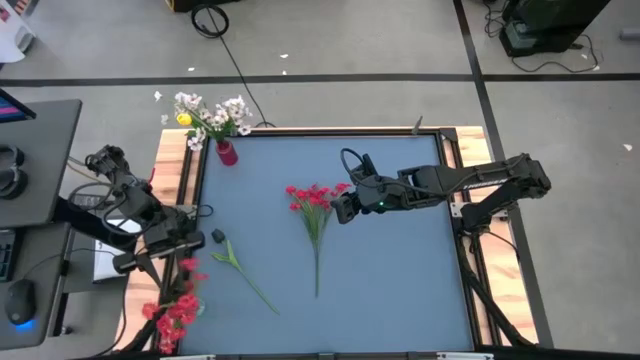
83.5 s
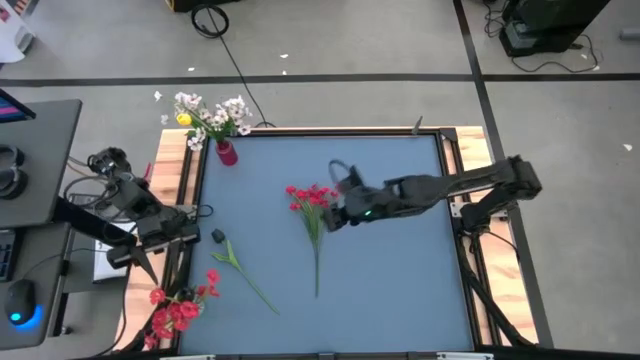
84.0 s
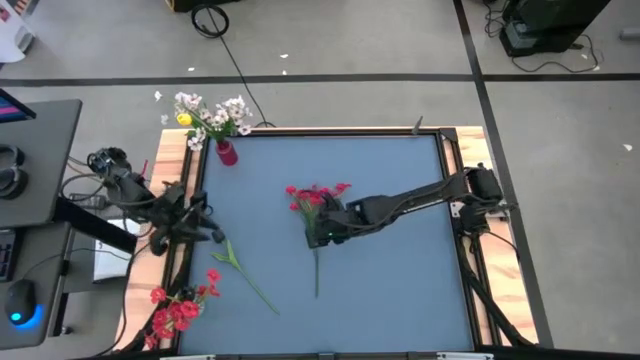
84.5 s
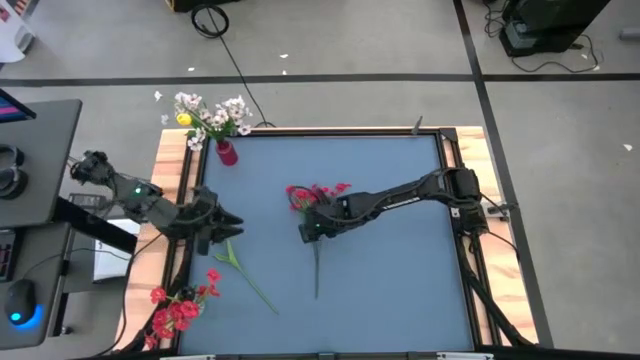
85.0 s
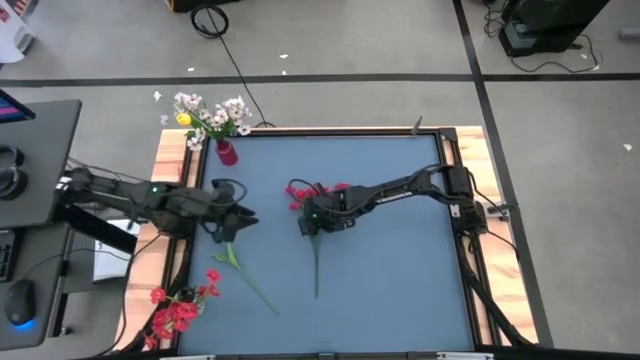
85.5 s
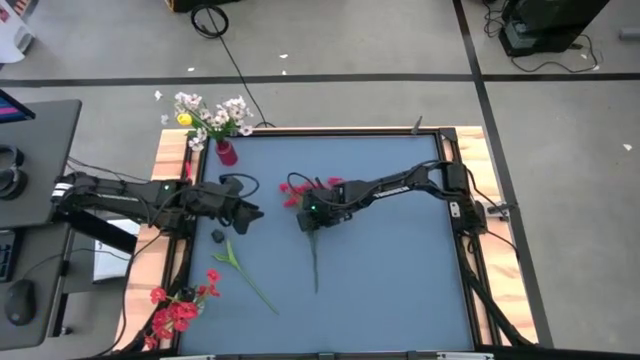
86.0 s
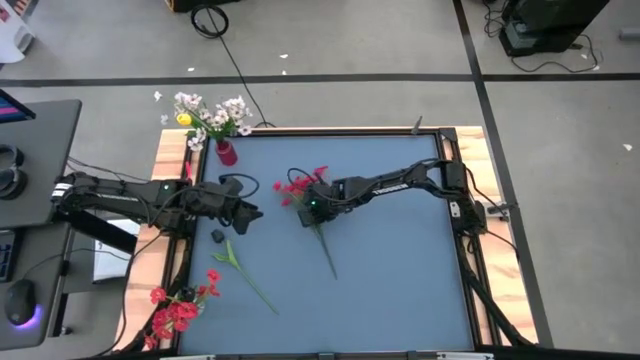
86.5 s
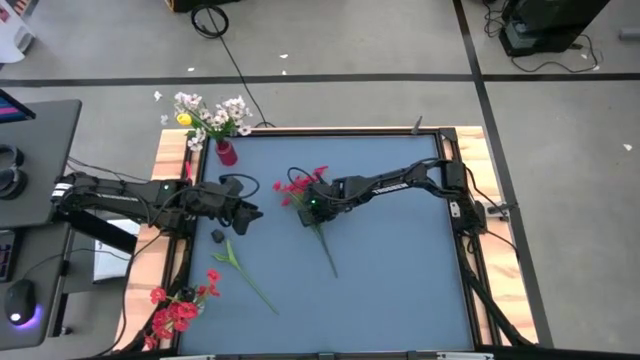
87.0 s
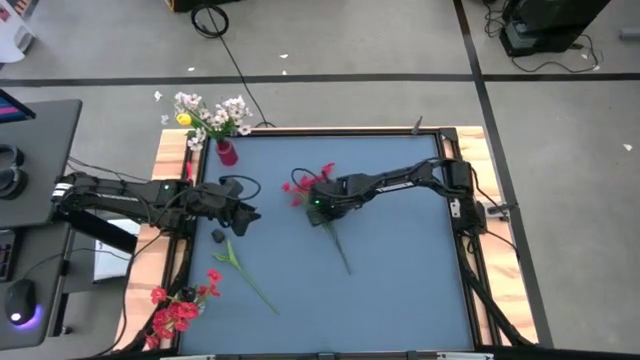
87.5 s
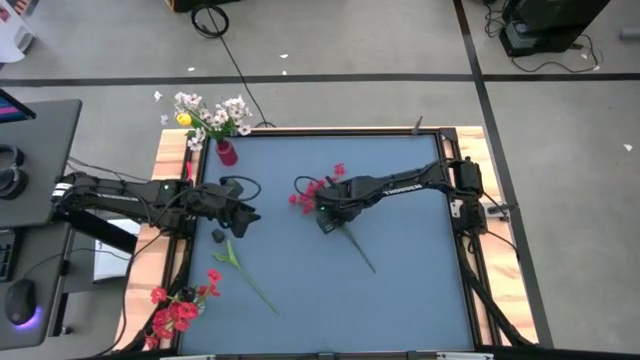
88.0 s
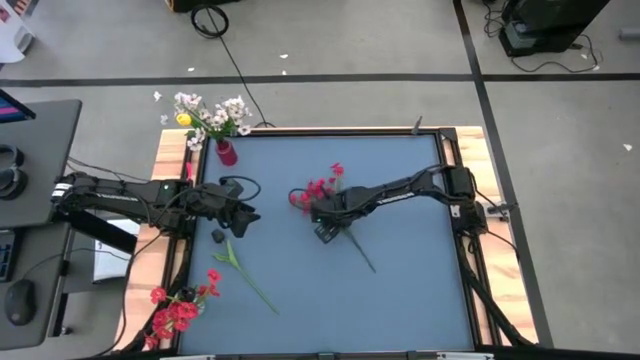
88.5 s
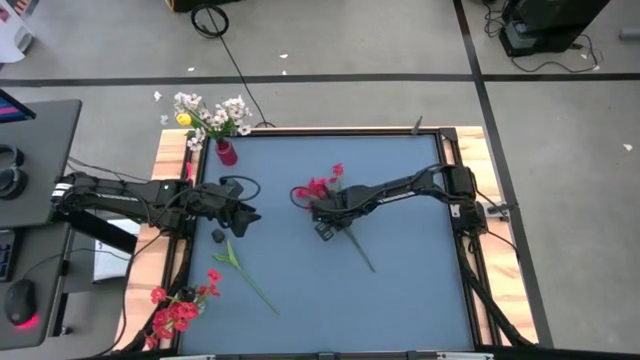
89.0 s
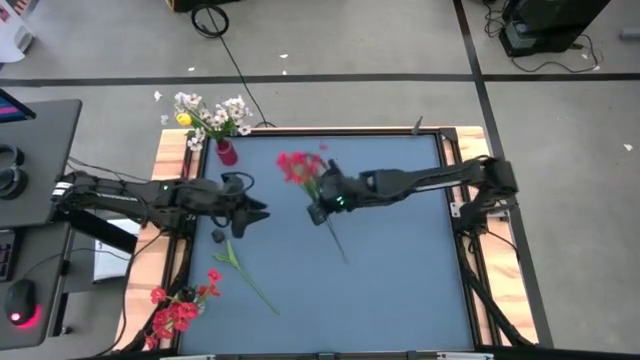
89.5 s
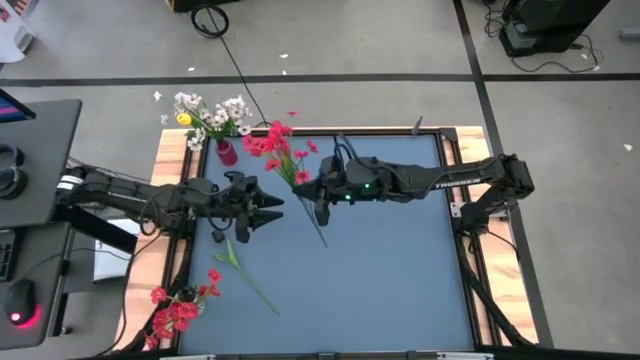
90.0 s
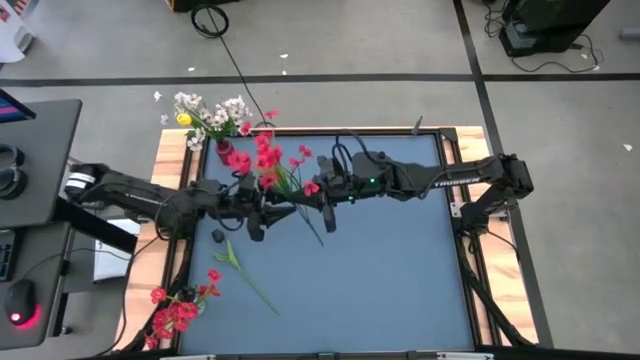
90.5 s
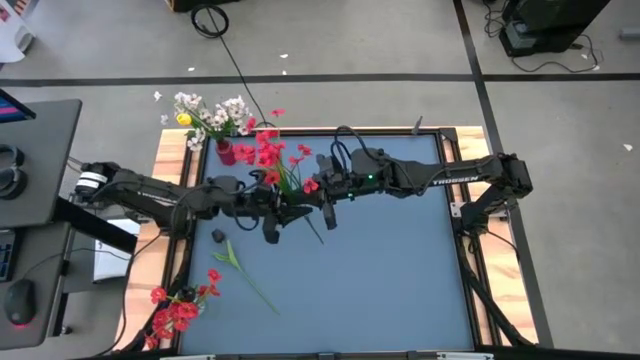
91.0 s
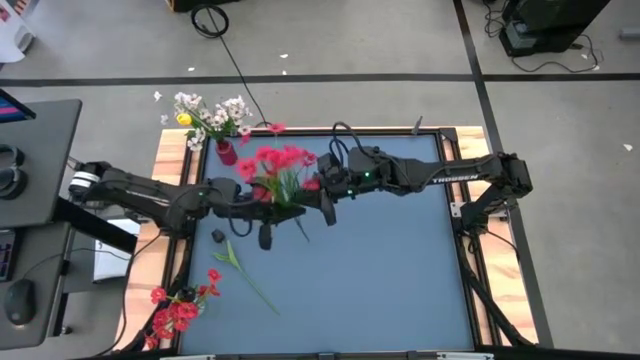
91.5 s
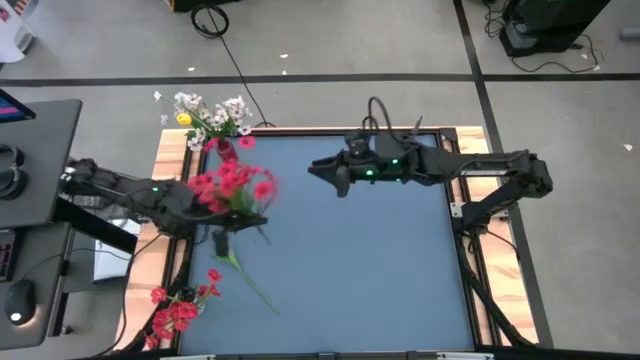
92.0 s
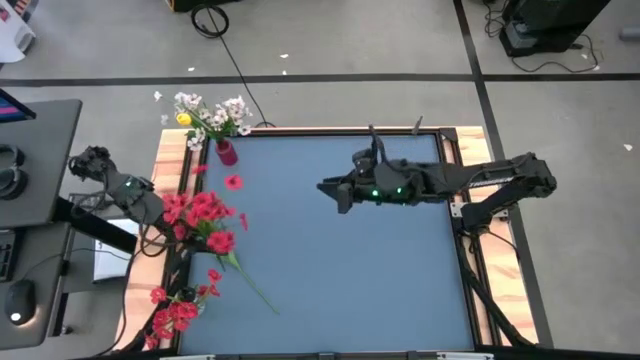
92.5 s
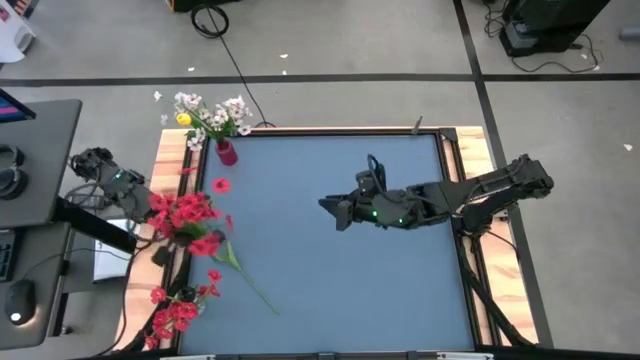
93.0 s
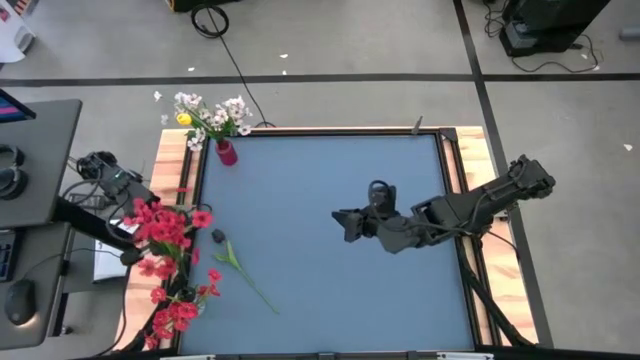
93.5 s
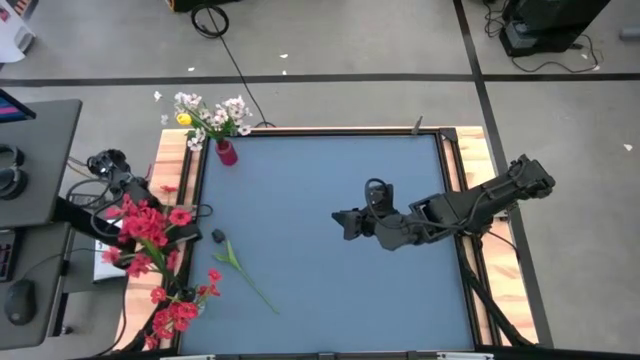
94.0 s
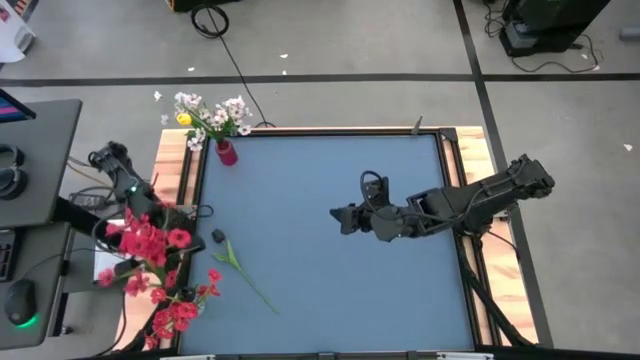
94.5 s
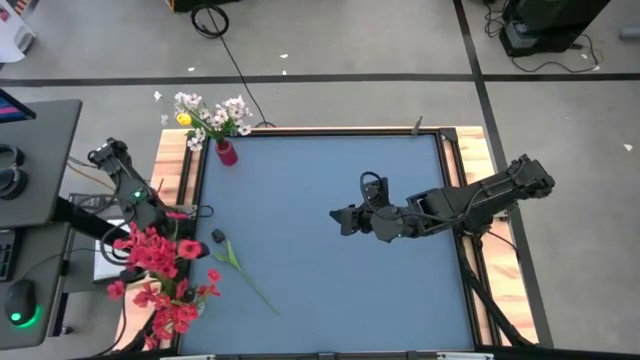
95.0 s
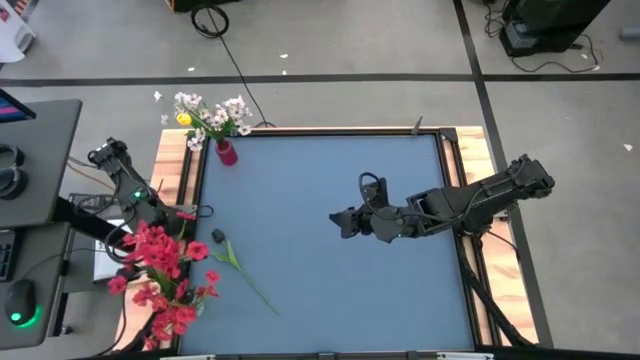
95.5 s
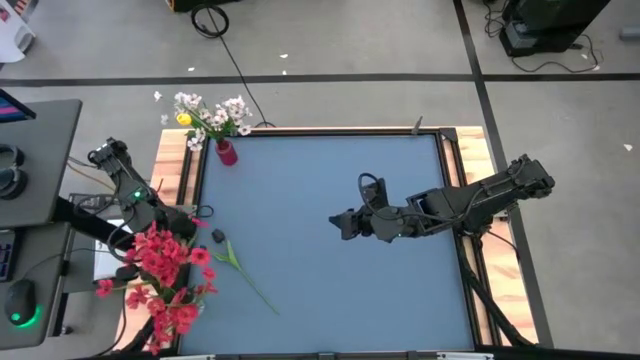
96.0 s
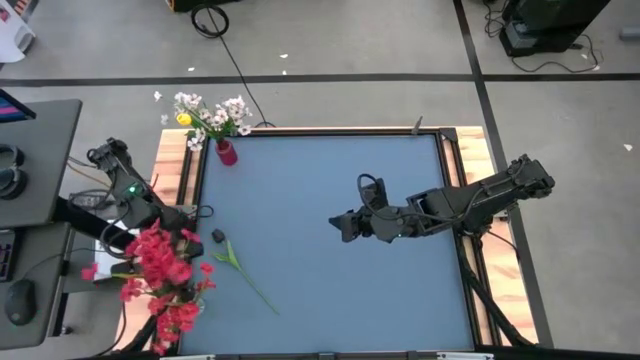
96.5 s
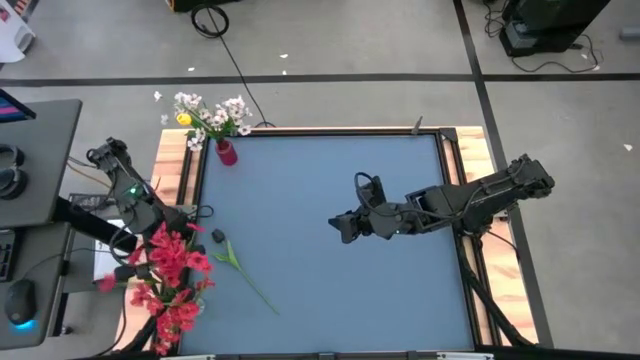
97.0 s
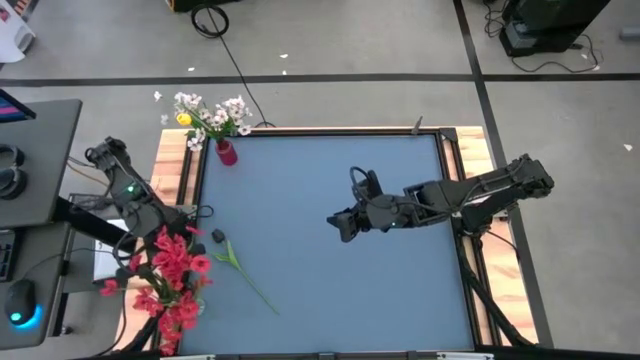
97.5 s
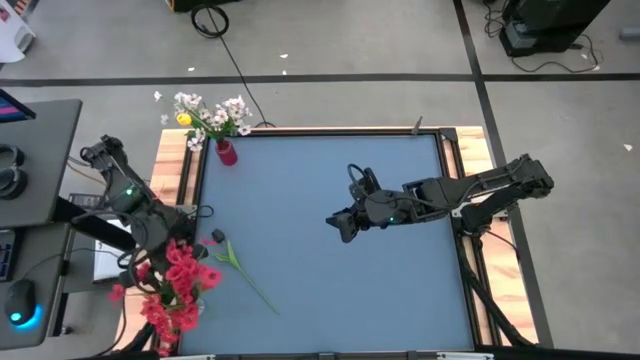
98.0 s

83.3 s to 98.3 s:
Task: Sort flowers into vase by color
Put the red flowers into the transparent vase

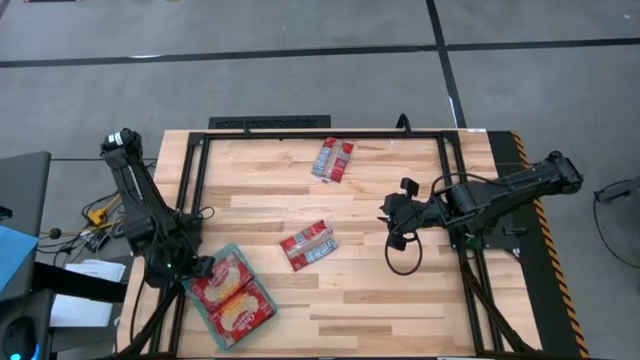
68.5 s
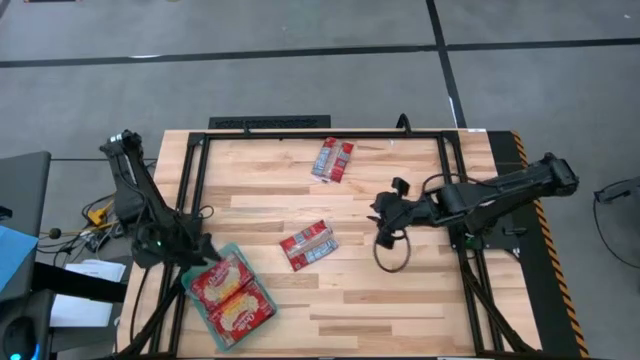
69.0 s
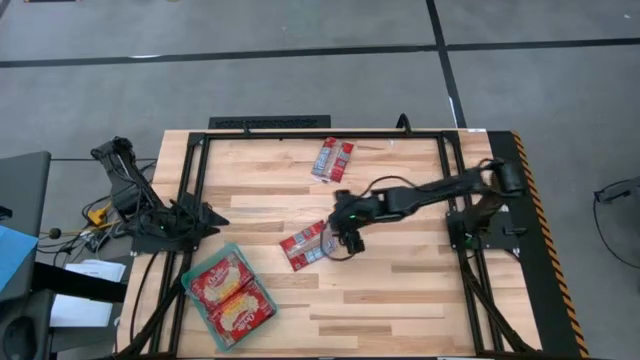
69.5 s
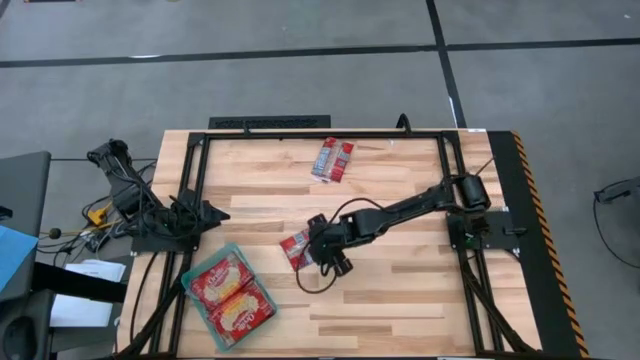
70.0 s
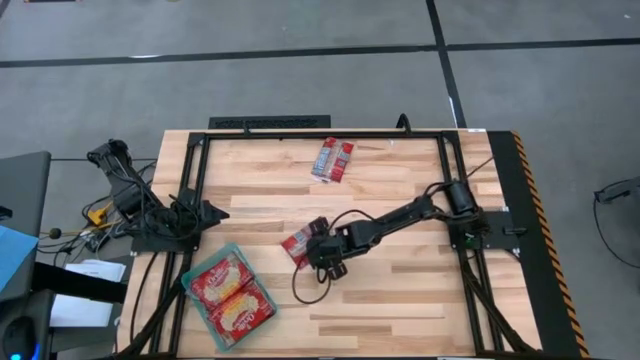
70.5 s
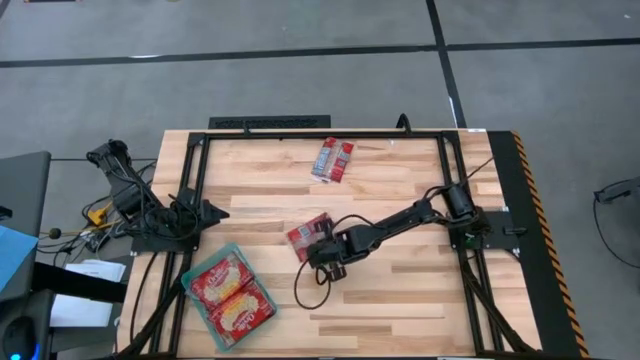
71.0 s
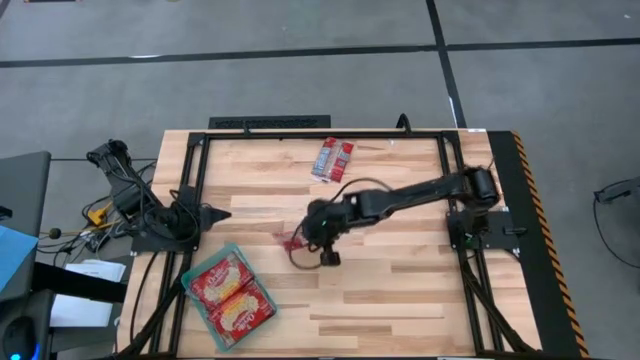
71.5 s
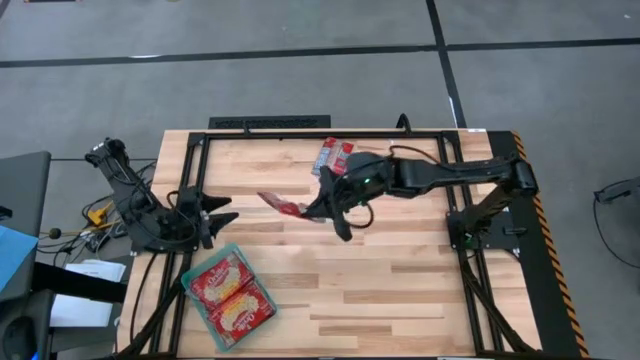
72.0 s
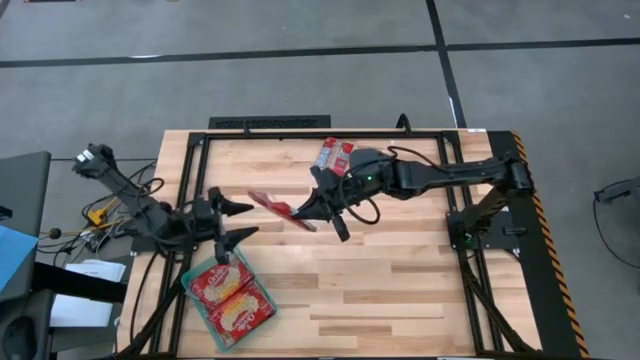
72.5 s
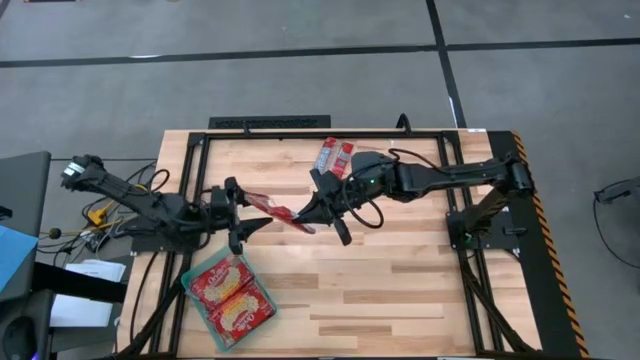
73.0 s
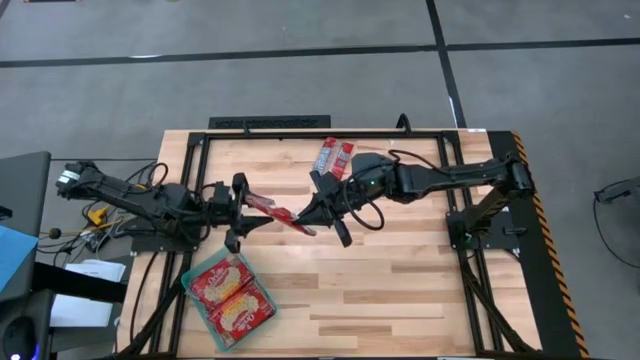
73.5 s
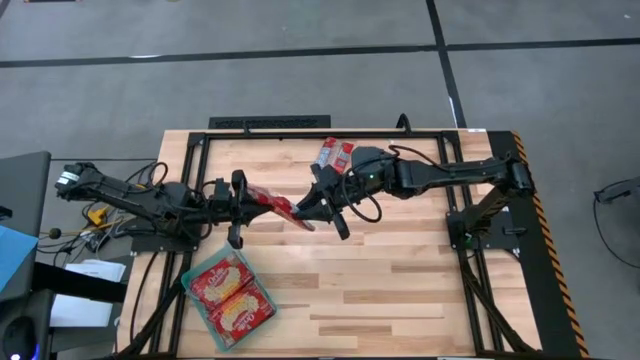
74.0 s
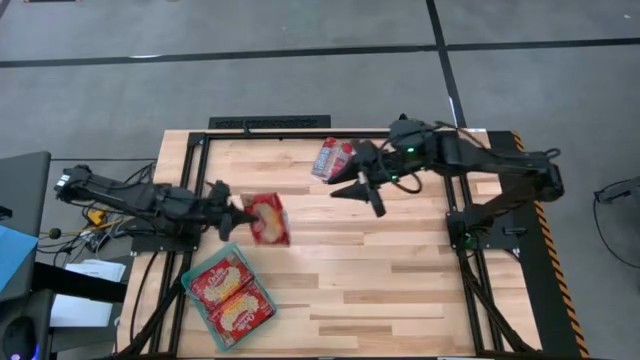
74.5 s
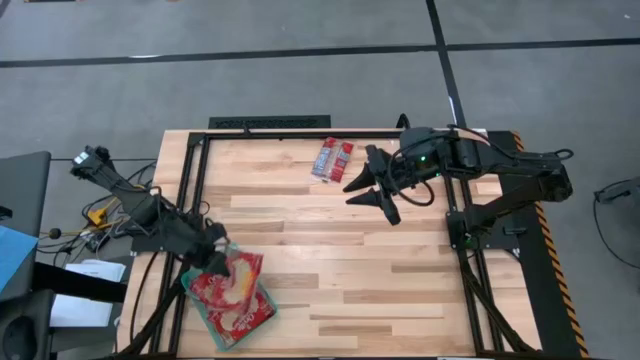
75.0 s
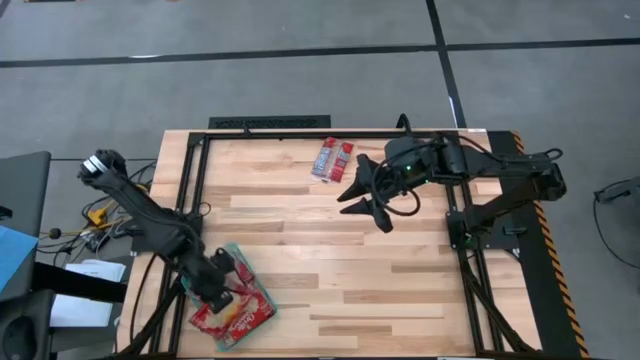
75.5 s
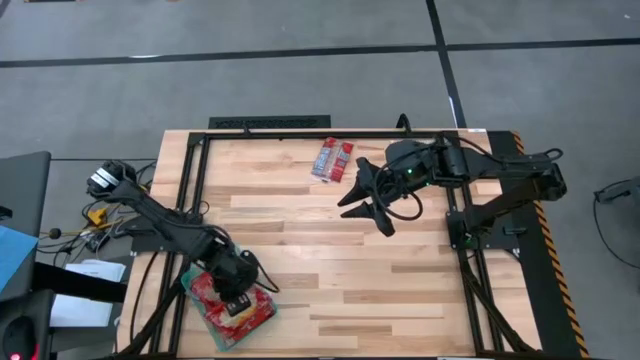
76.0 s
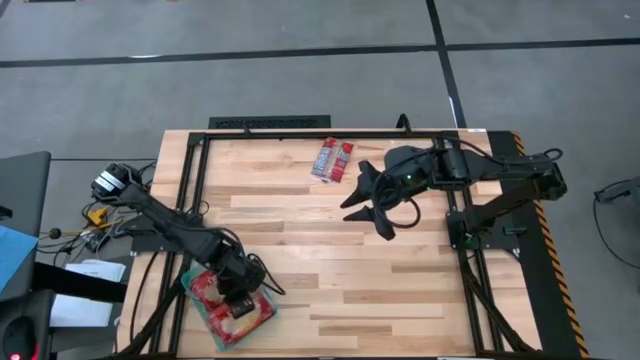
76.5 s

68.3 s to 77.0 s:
Task: Sort popcorn bags into baskets
Put the red popcorn bag into the green bin
